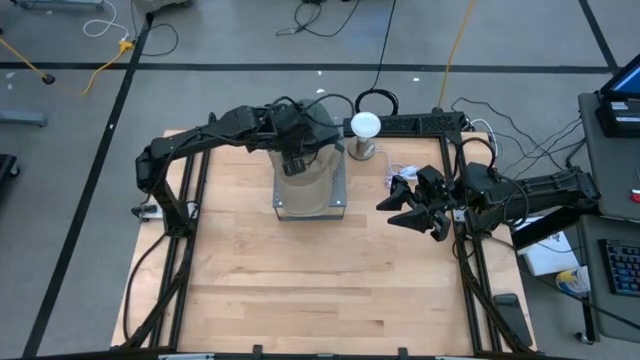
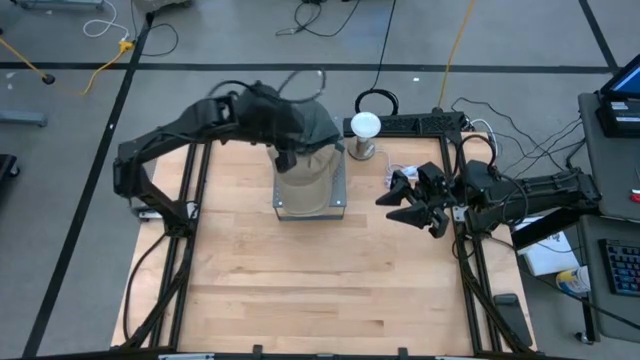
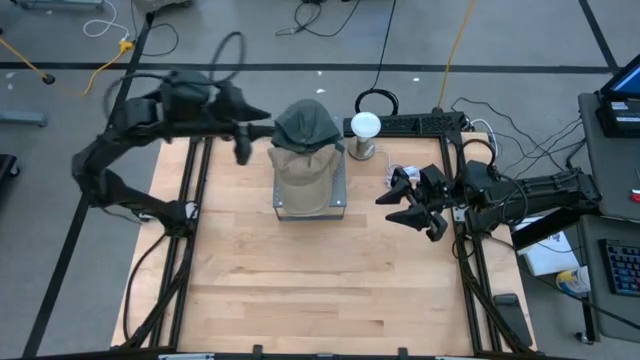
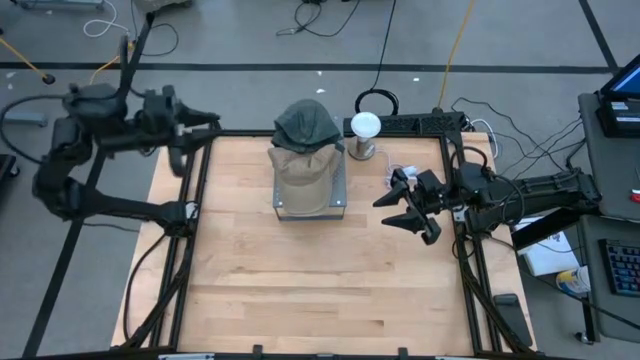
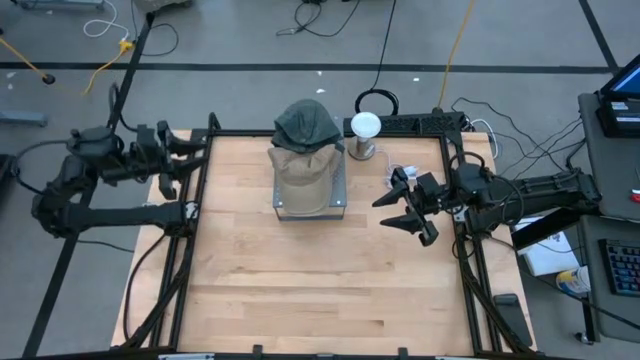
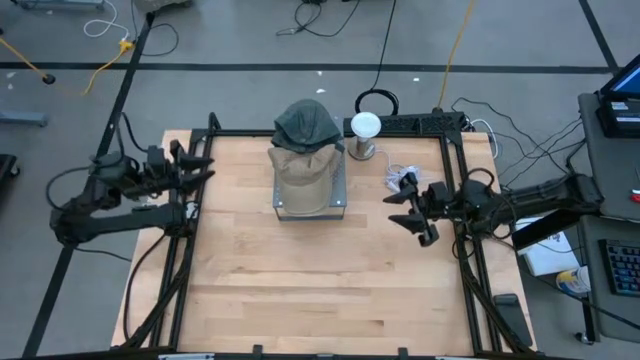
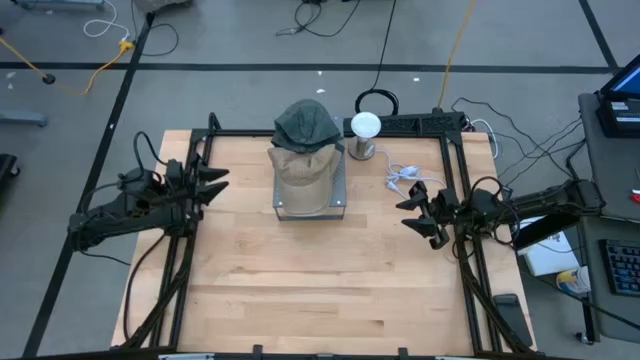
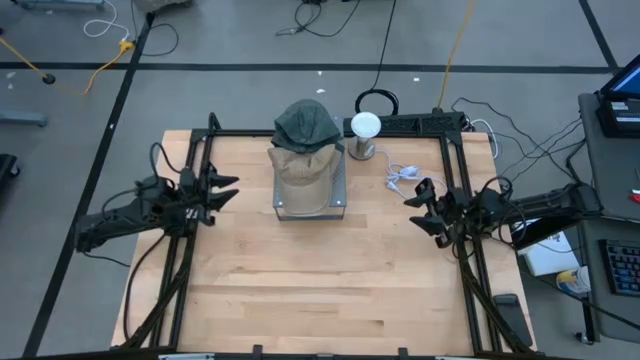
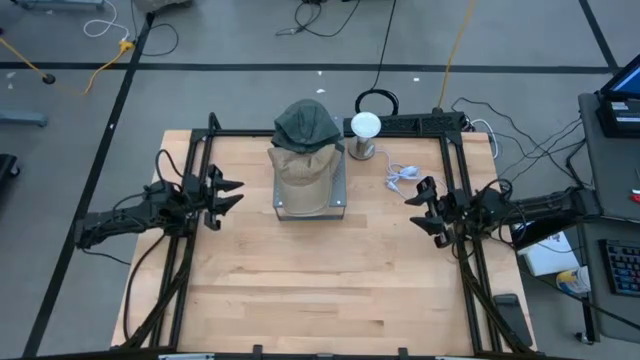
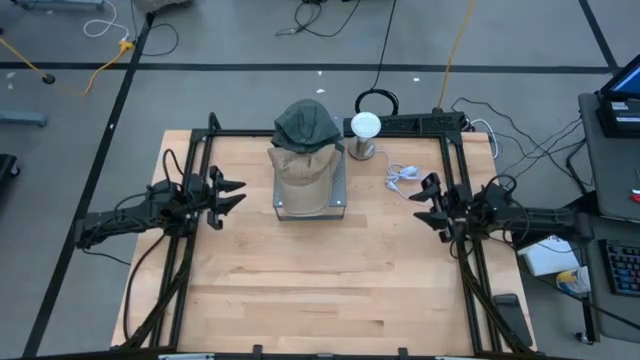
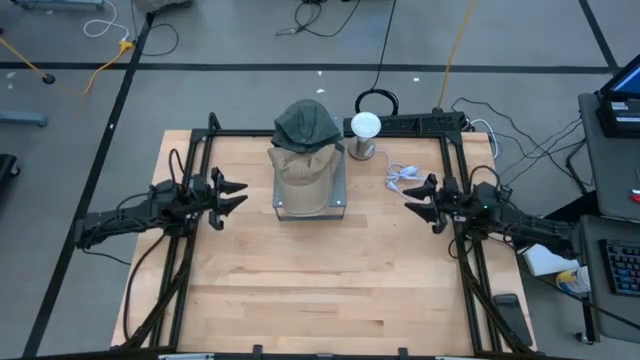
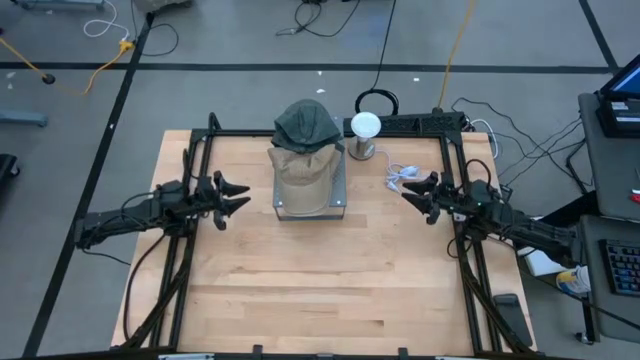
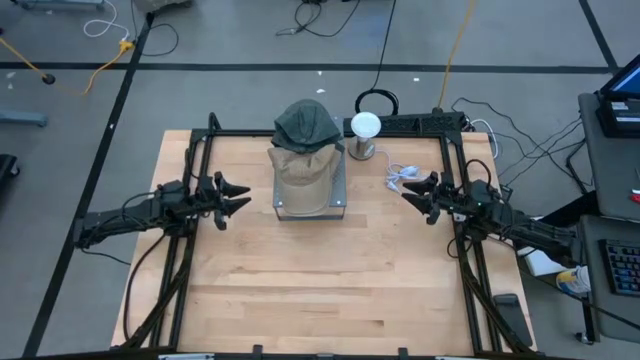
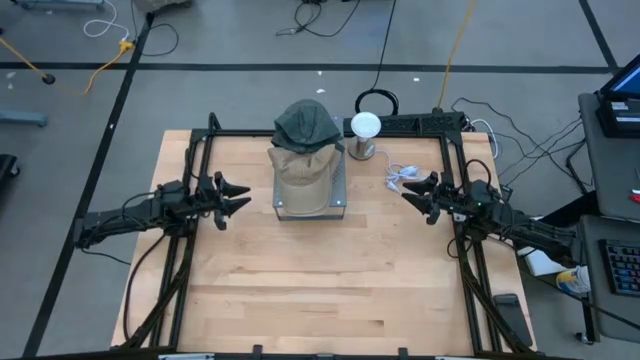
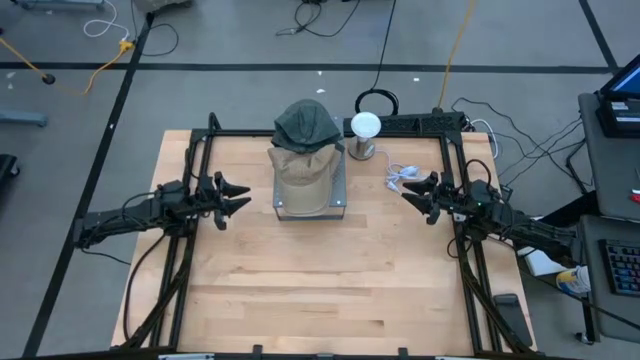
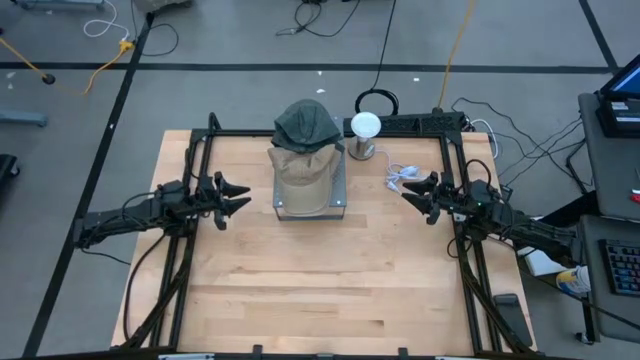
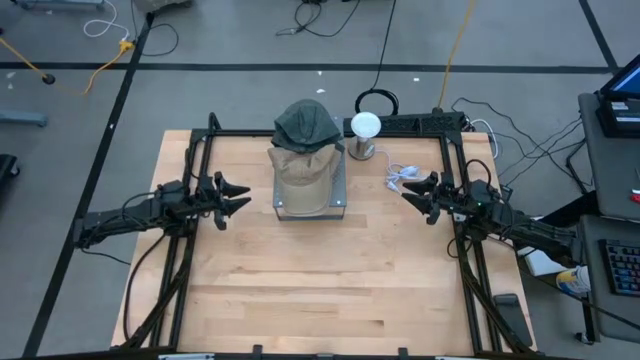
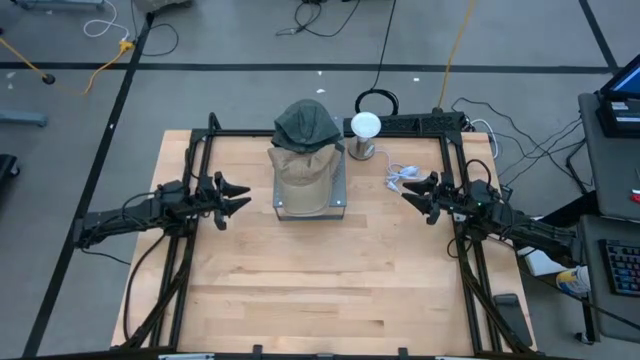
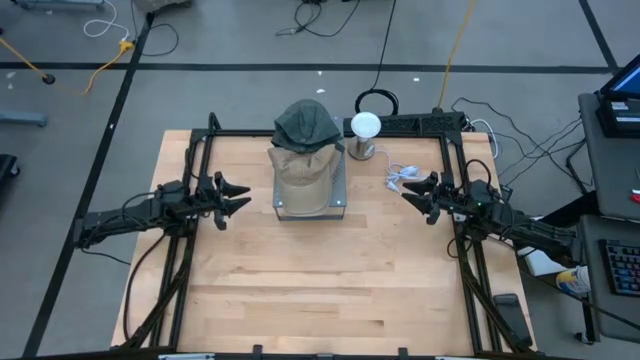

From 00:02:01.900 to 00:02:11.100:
Task: Pick & Place hat
Return to Home Position

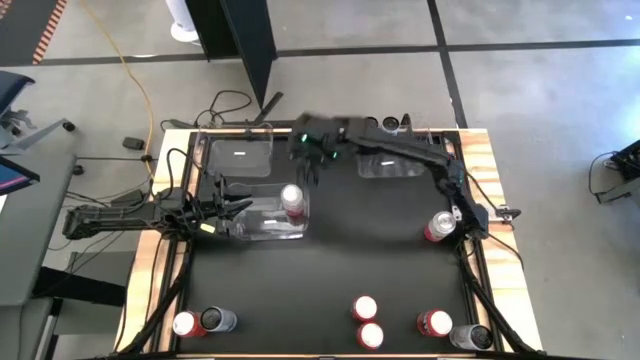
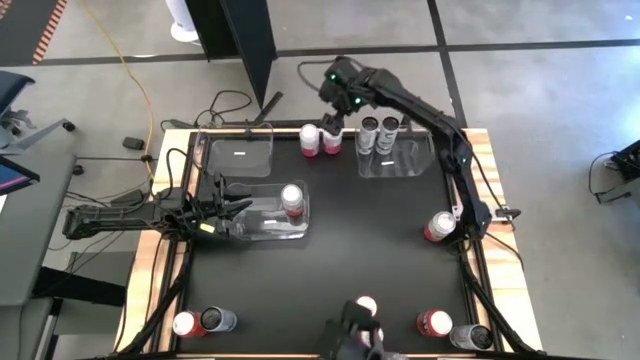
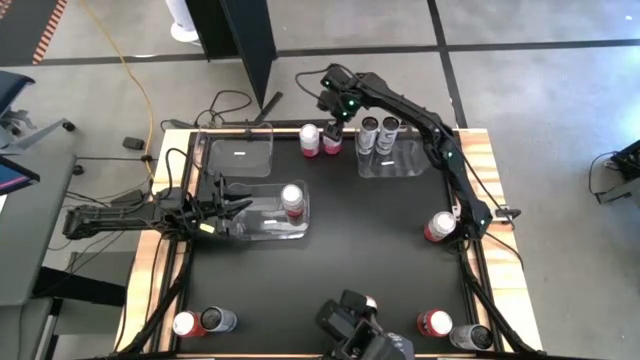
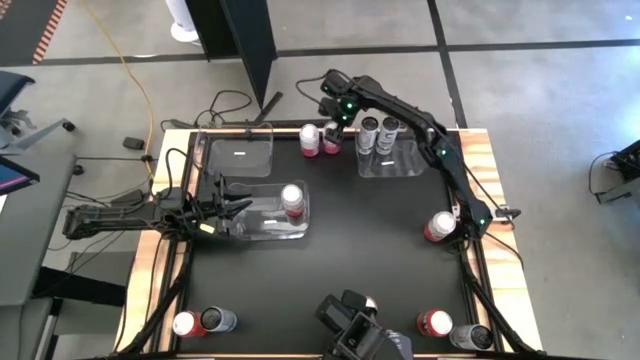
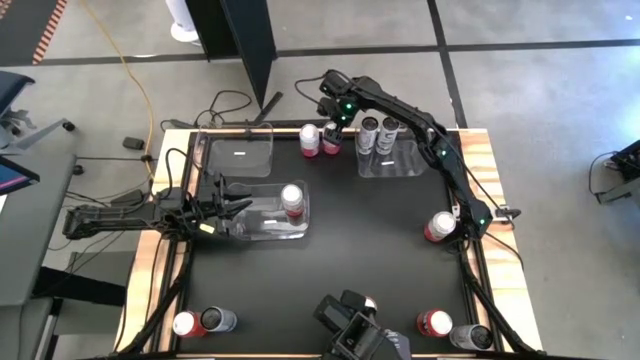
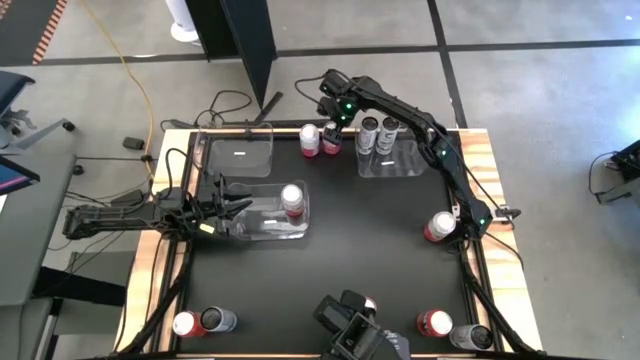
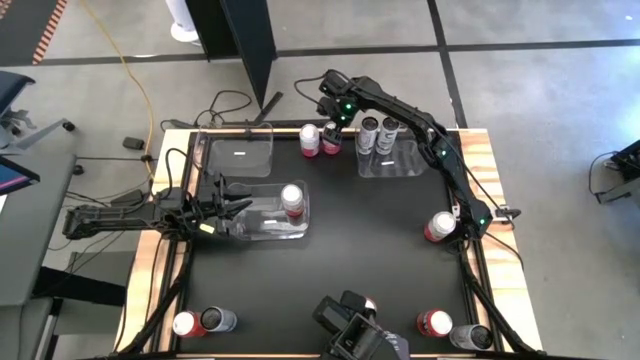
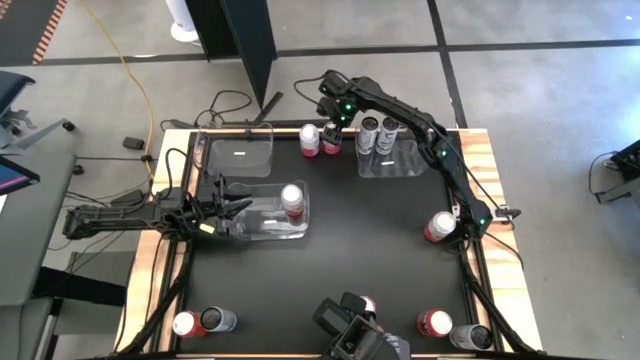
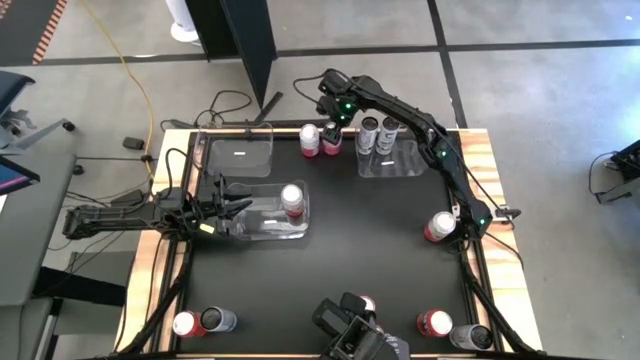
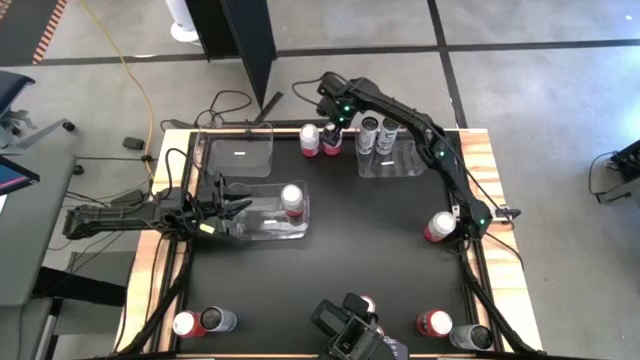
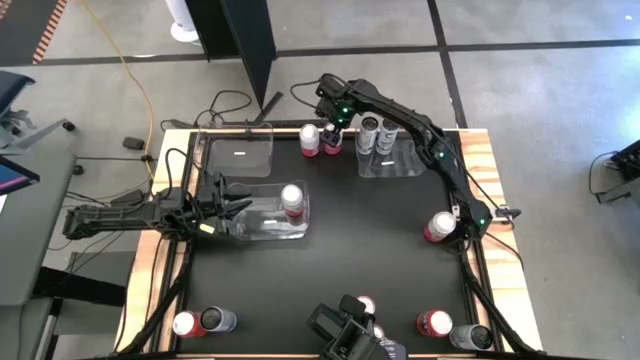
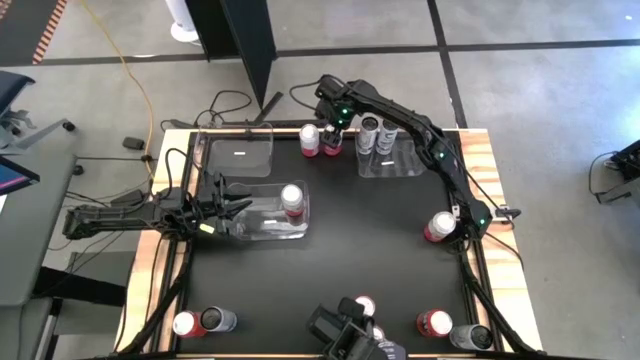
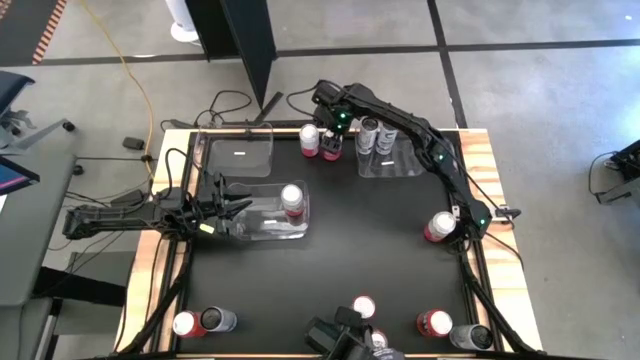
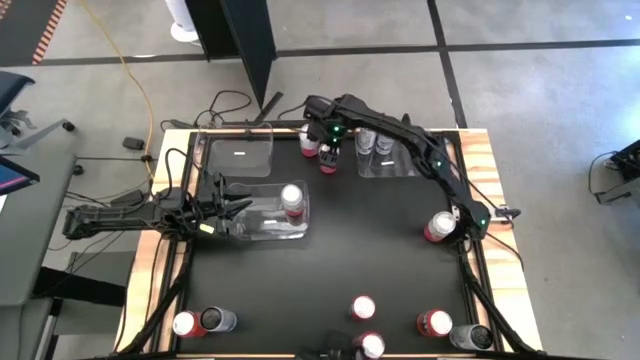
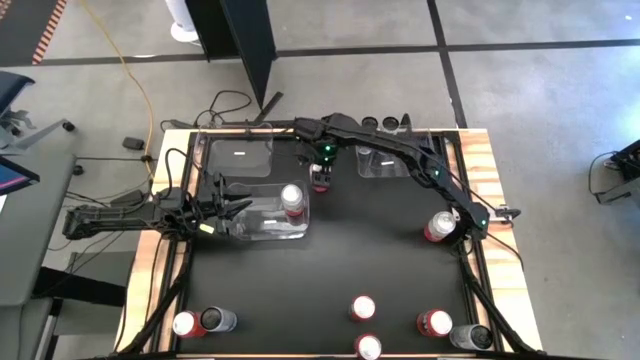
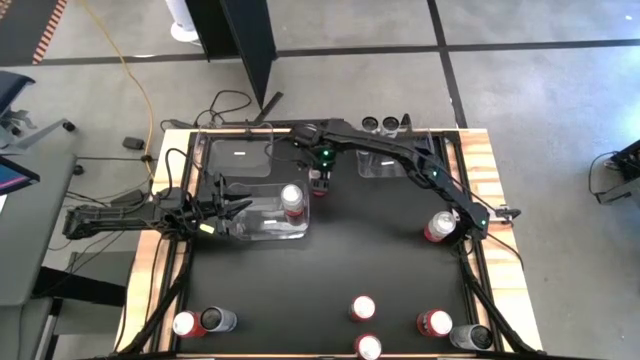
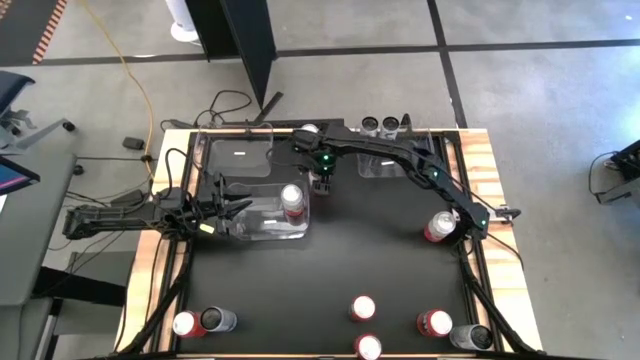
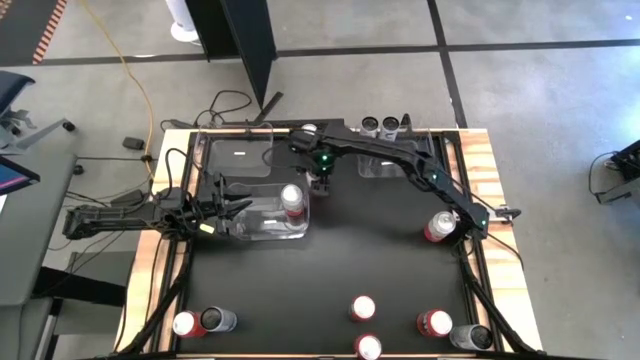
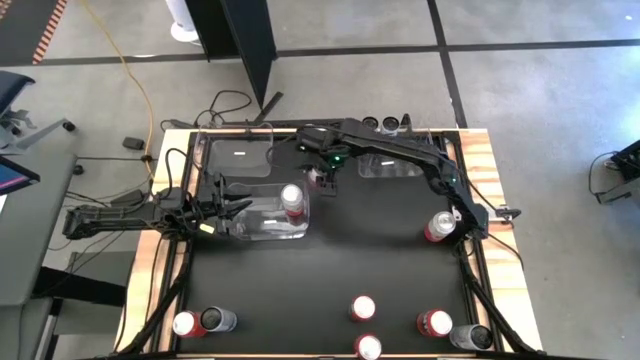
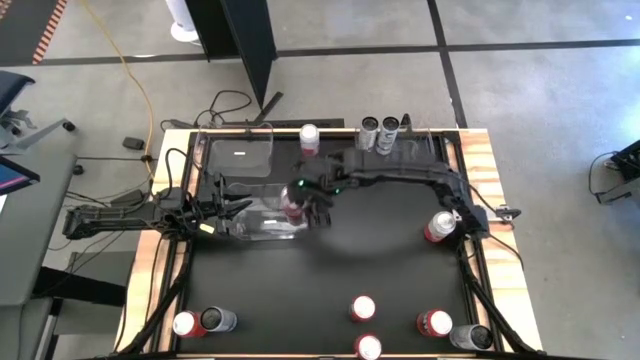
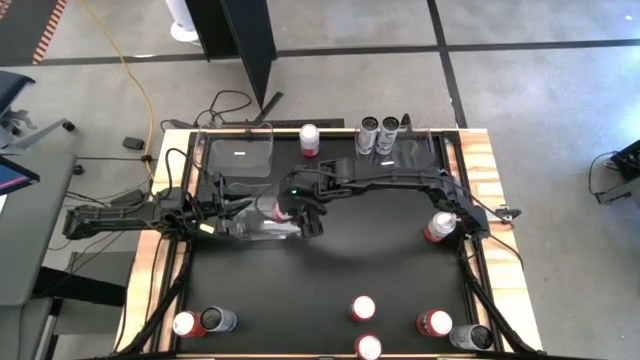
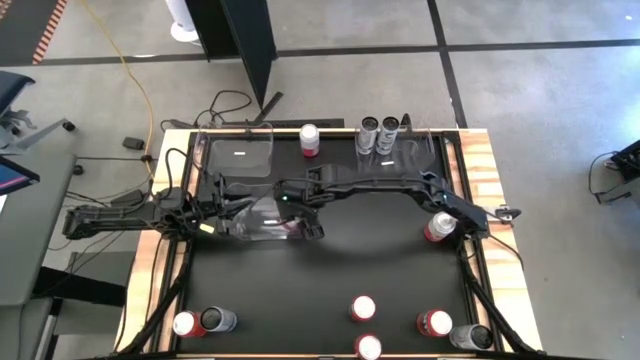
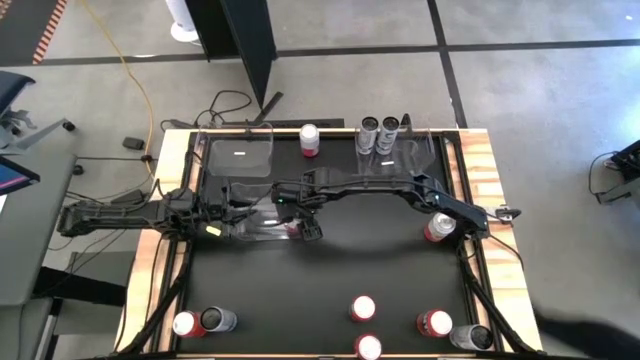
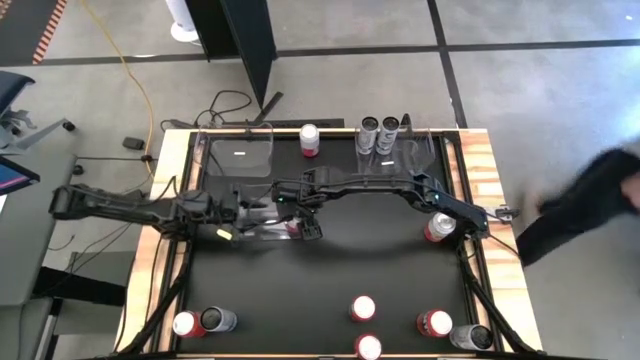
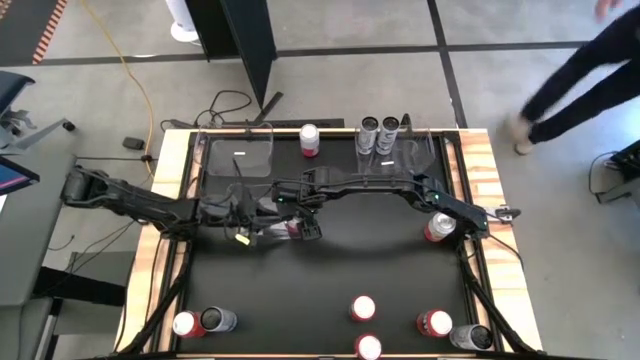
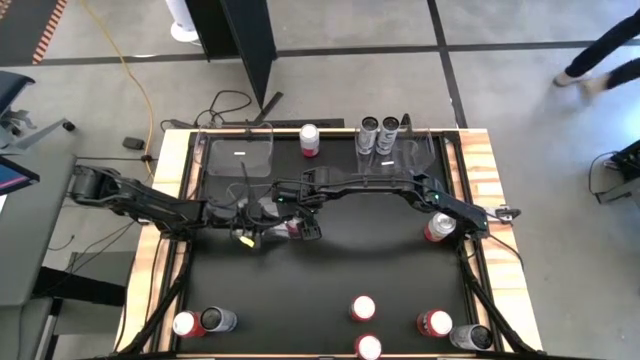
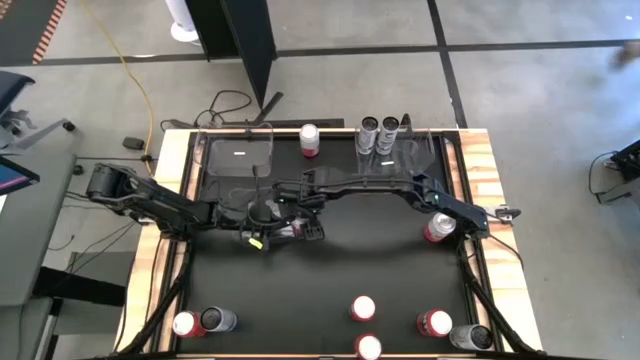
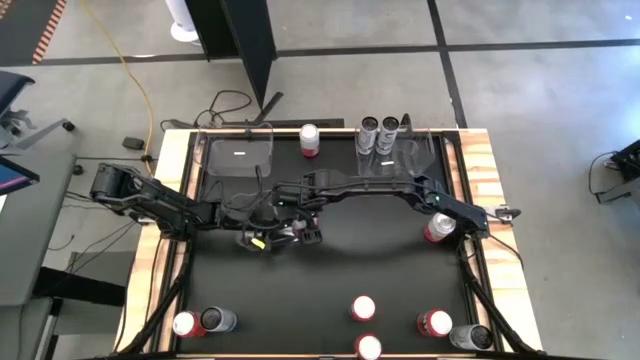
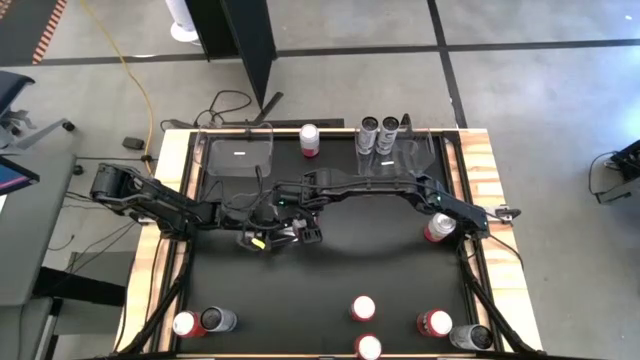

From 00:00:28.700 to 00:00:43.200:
Task: Sort soda cans
Put the top right pink-white soda can into the bottom transparent bin
